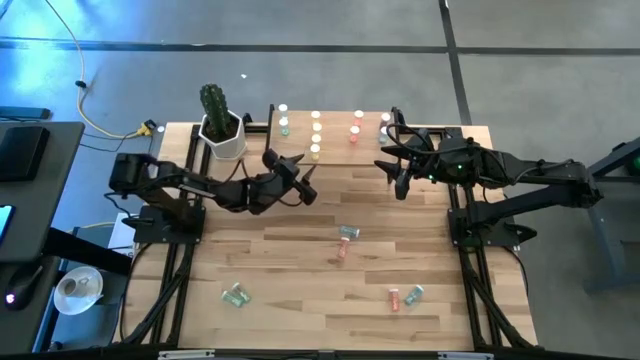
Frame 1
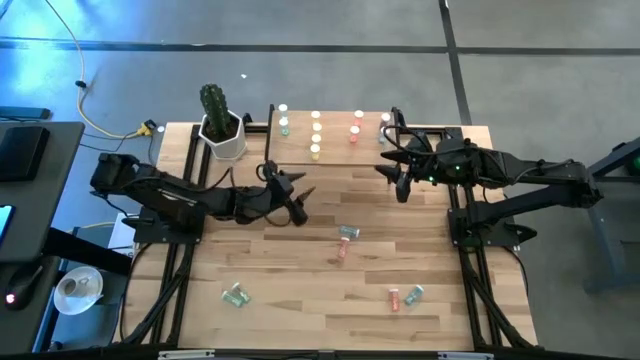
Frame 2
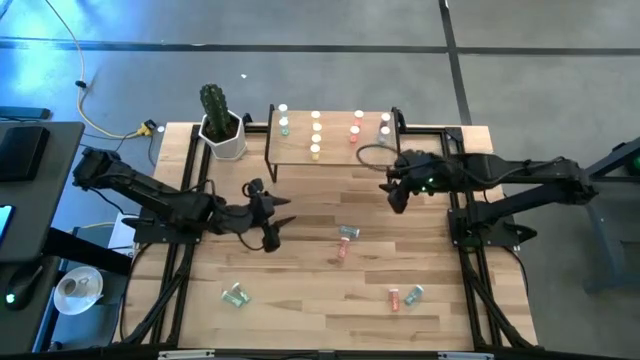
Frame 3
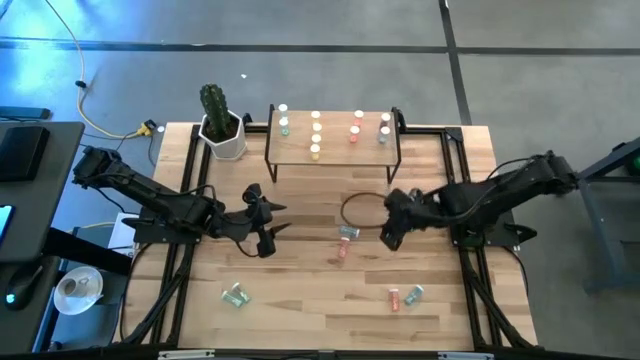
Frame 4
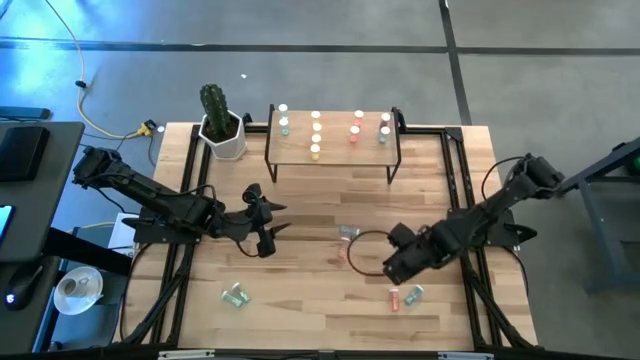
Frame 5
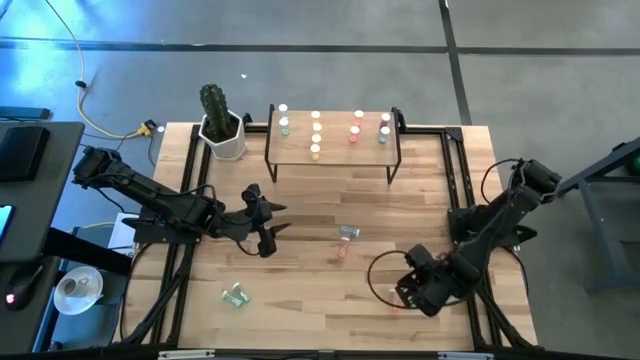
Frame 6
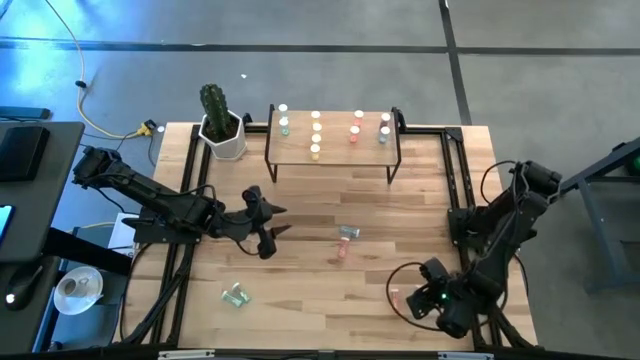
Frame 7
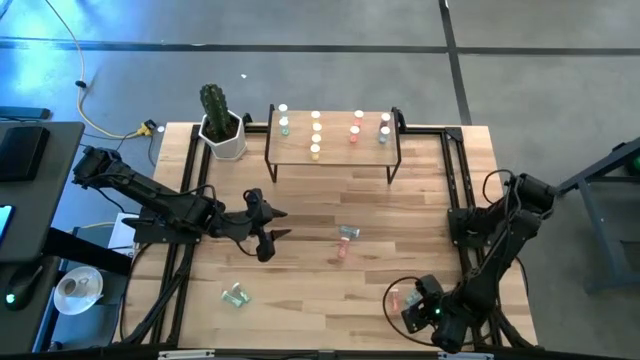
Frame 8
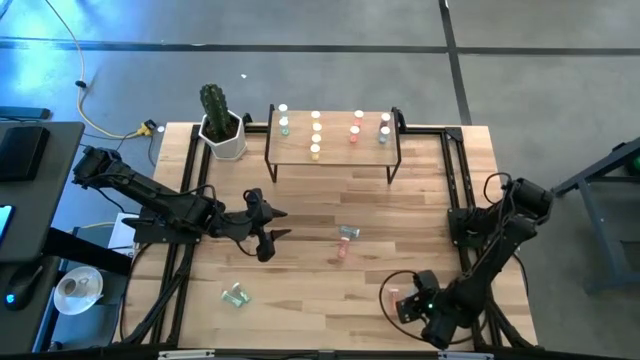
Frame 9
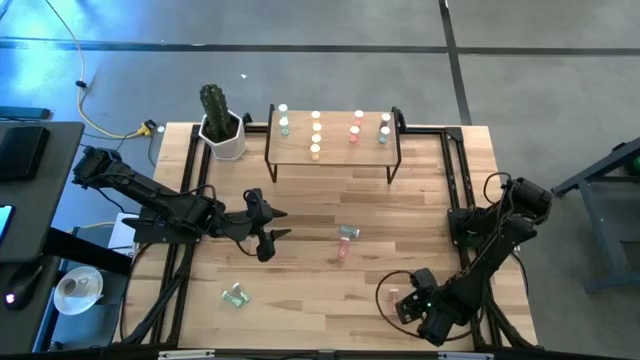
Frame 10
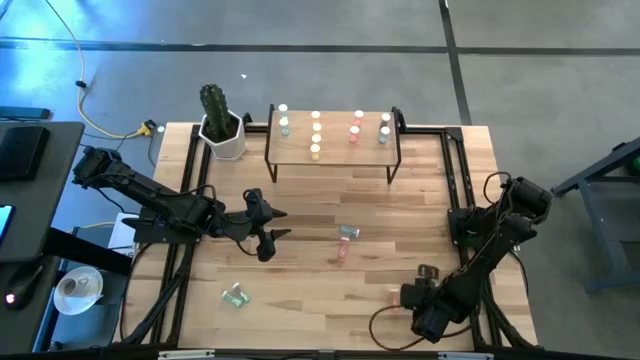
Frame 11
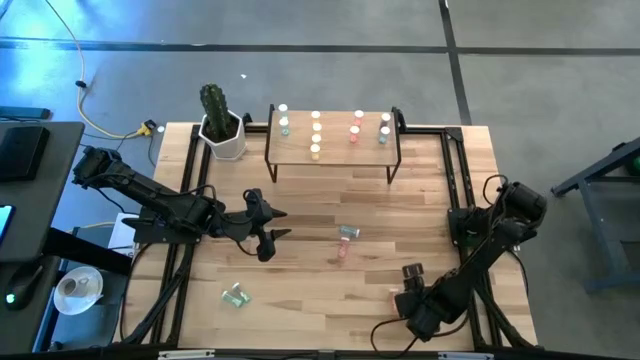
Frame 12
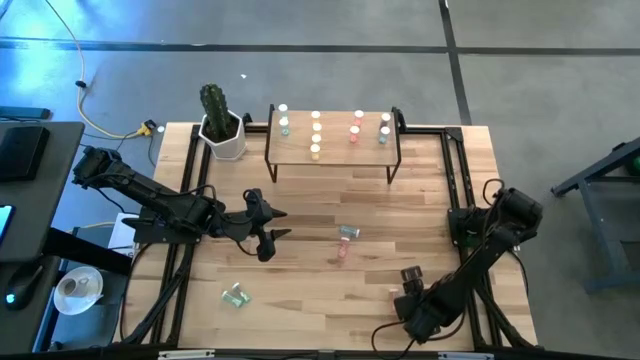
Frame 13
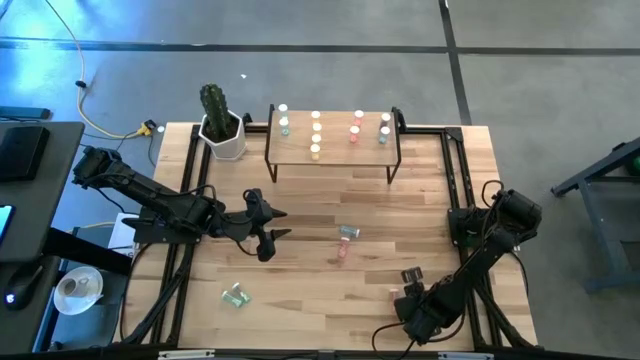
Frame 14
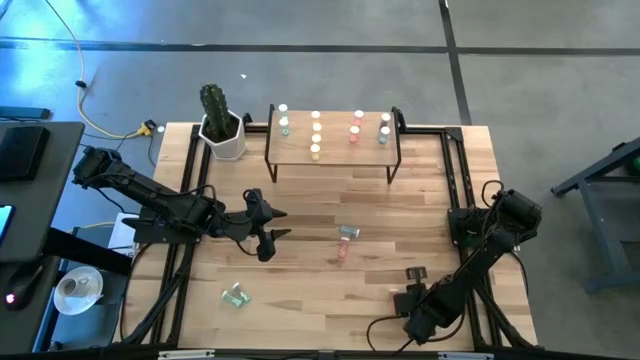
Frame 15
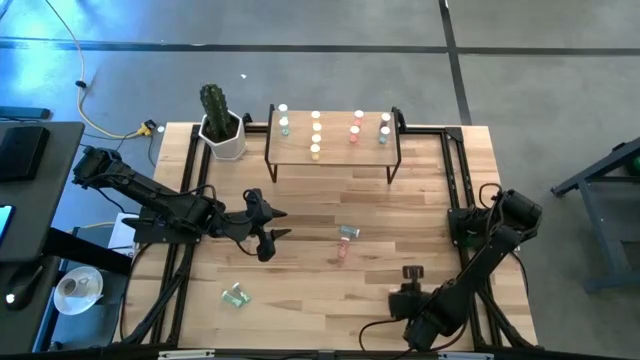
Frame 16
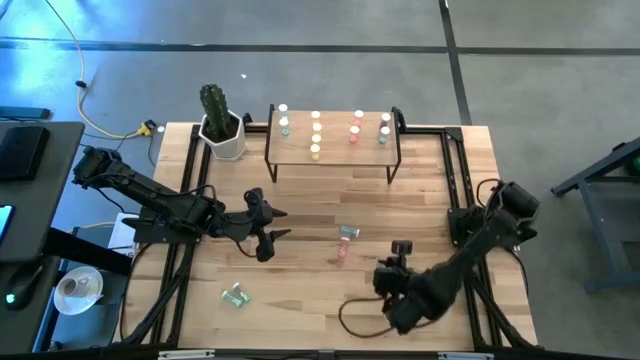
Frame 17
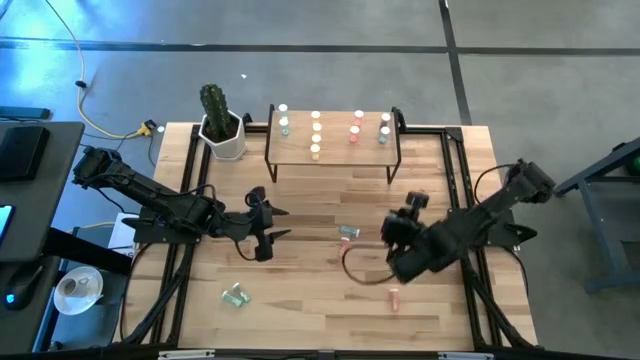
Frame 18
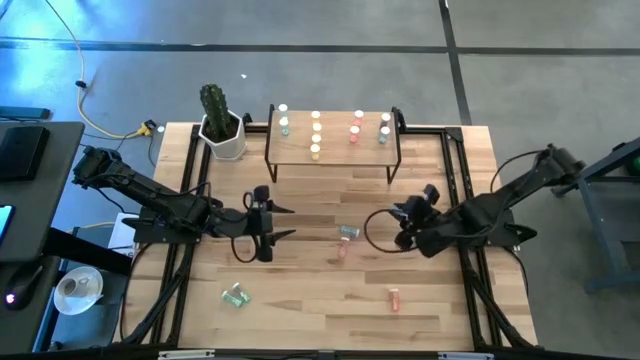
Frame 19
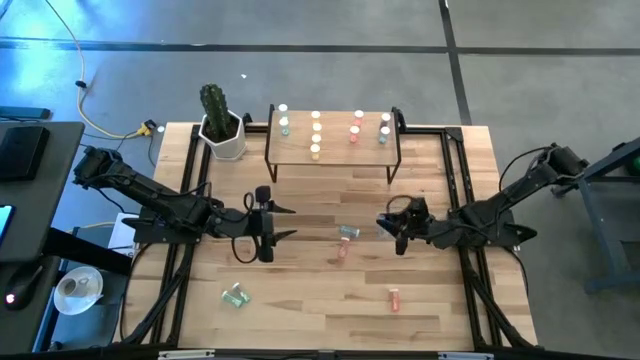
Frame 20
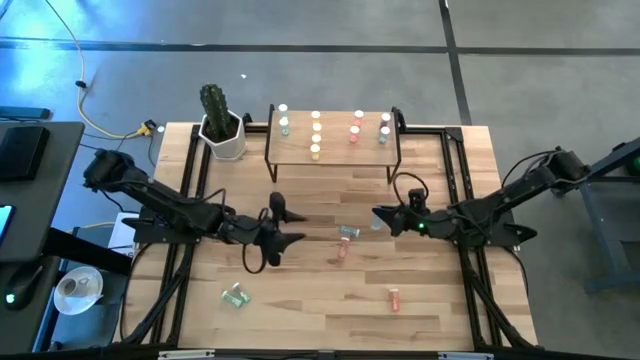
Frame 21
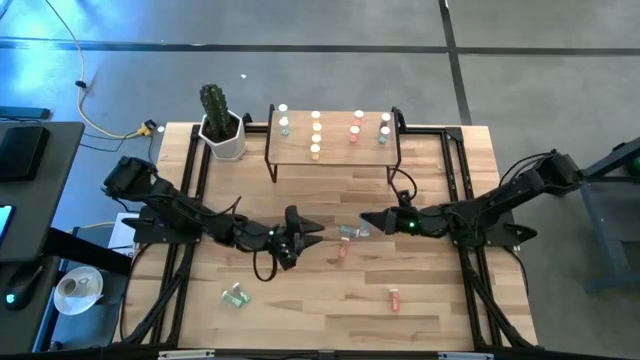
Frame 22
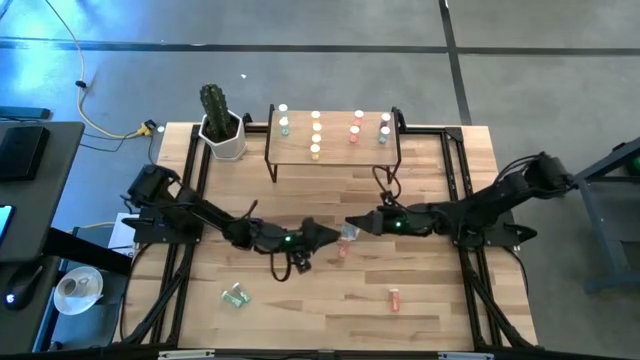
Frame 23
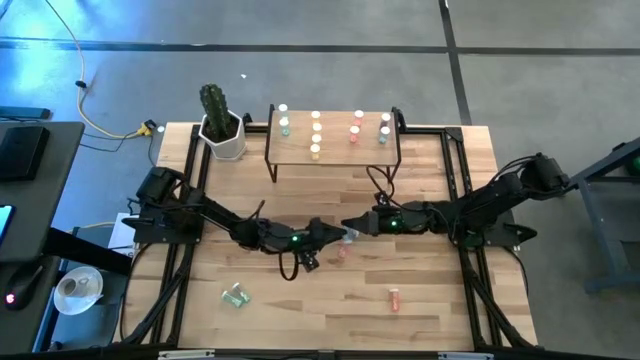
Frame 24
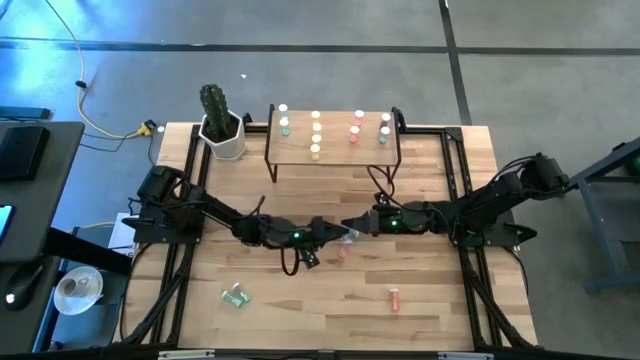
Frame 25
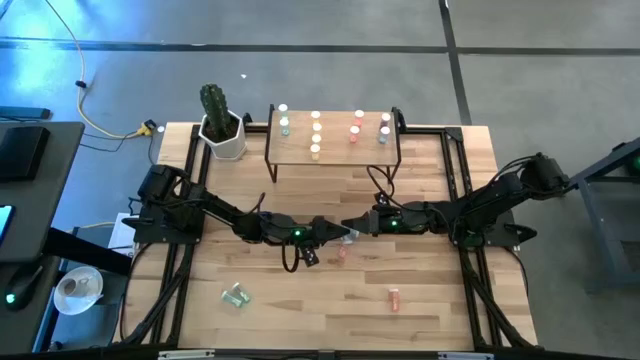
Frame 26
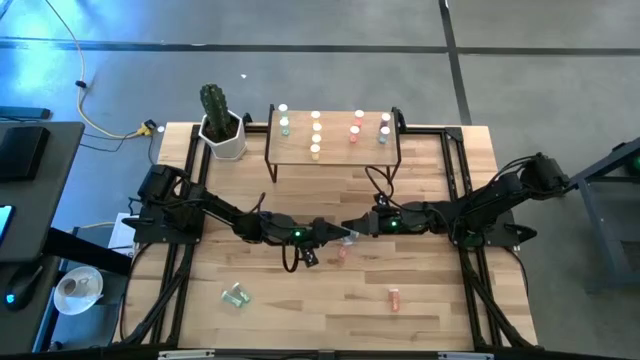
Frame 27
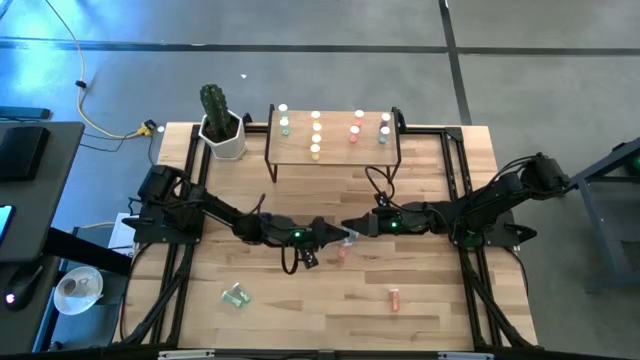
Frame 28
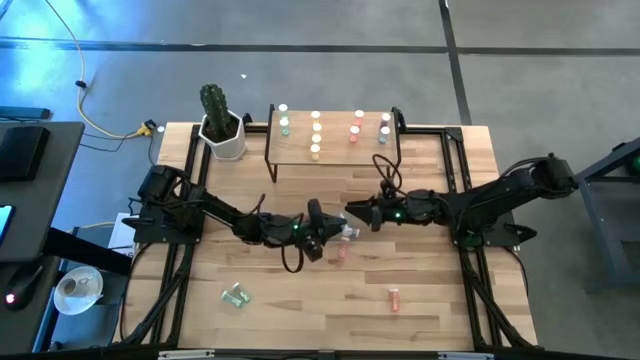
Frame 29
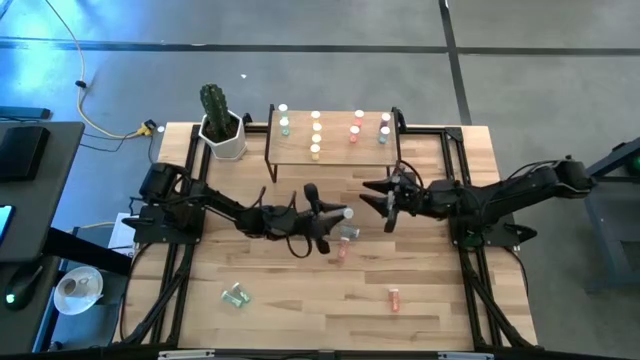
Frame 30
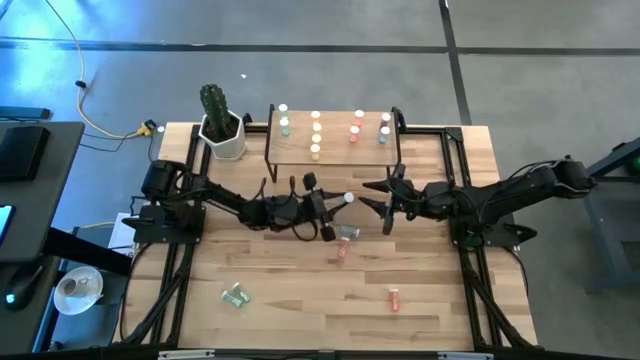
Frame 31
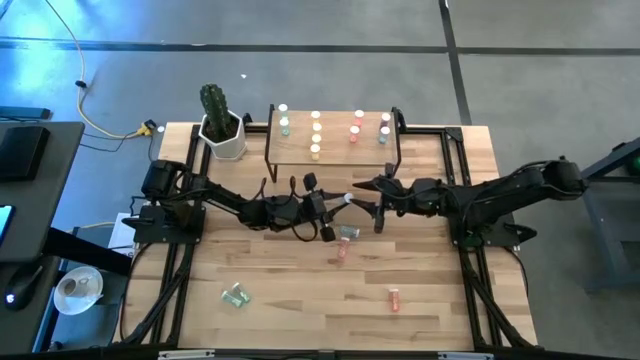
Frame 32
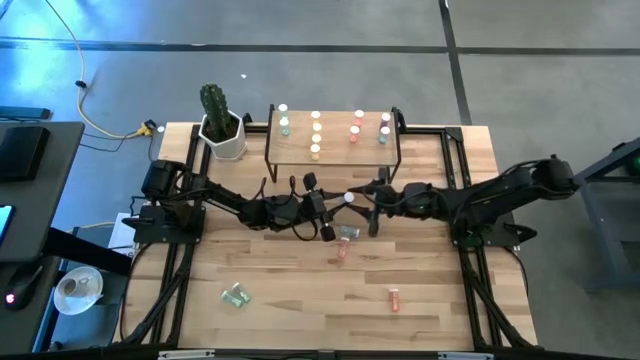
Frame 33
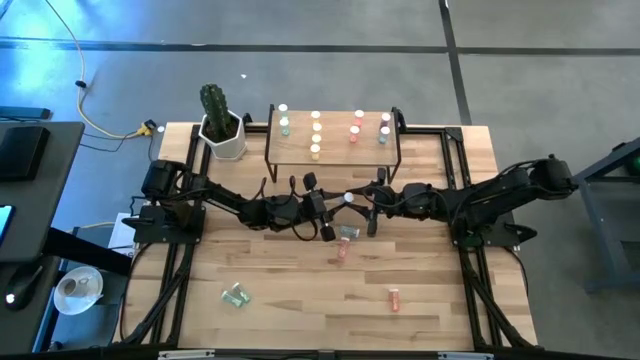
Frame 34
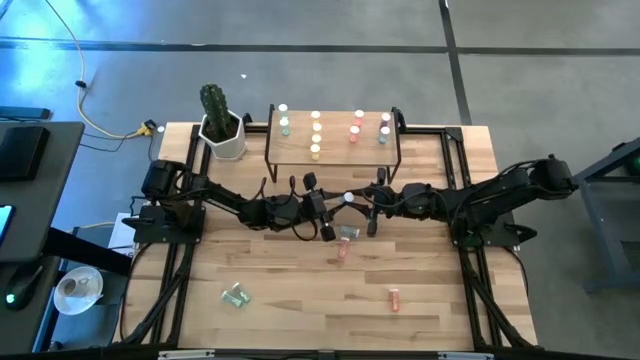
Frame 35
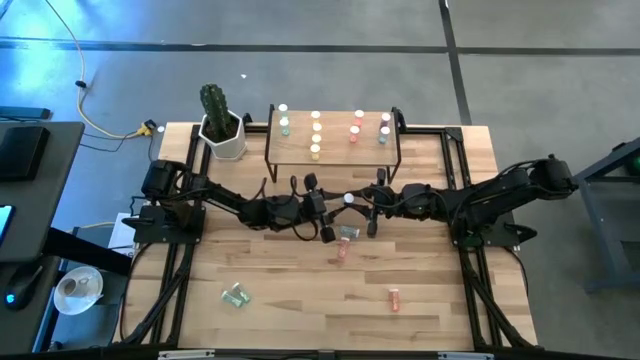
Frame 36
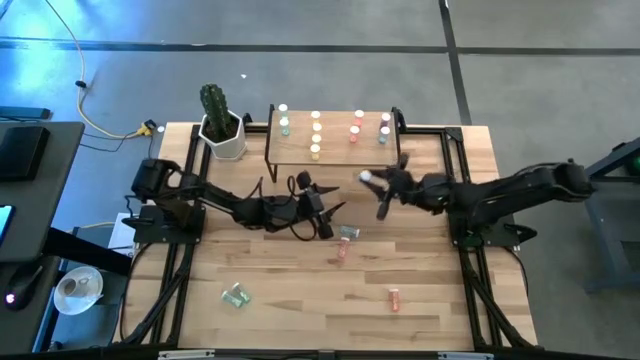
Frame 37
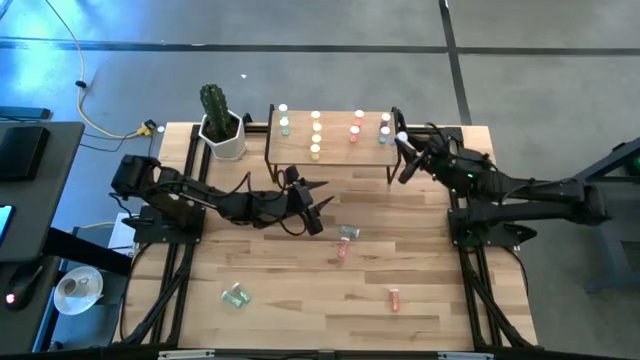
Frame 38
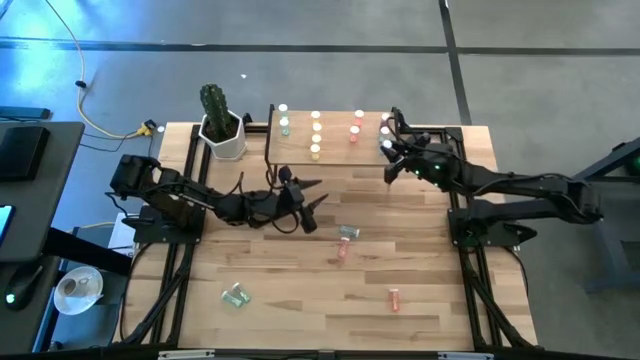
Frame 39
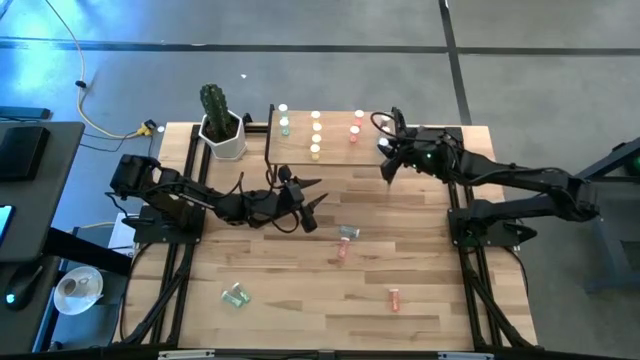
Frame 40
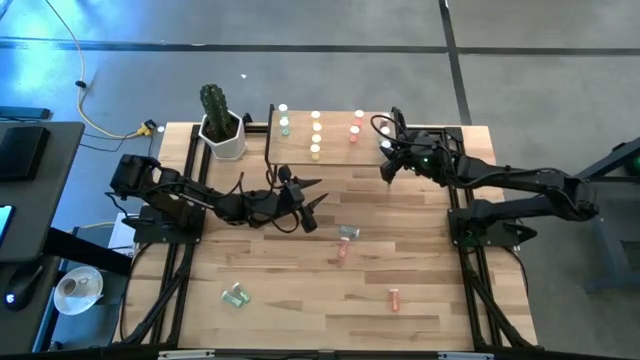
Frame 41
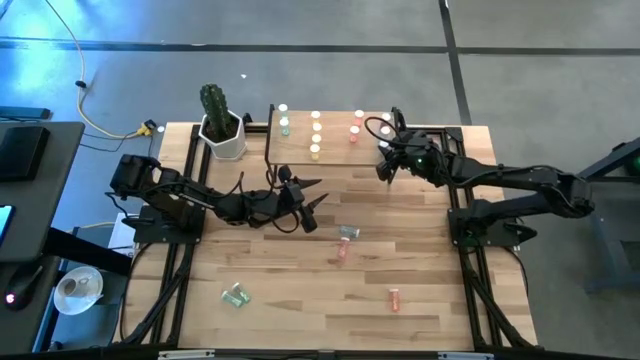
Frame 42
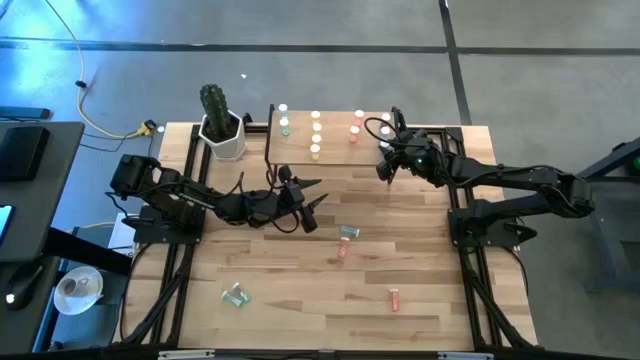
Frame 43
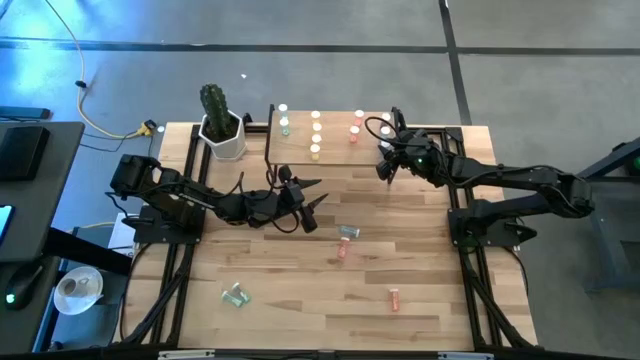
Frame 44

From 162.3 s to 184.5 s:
Task: Pick and place medicine bottles onto shelf by color
Put the right blue pill bottle on the shelf aligned with the other blue pill bottle
